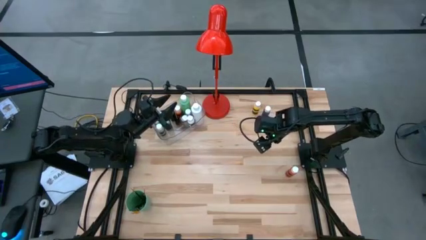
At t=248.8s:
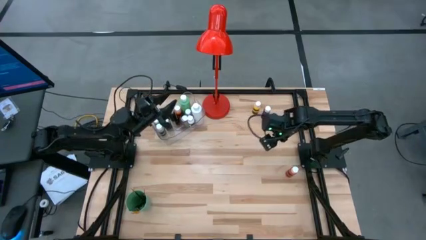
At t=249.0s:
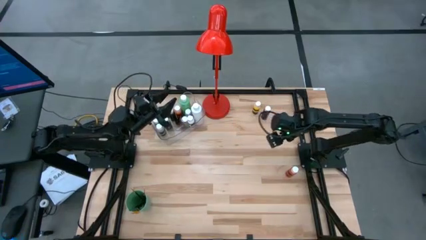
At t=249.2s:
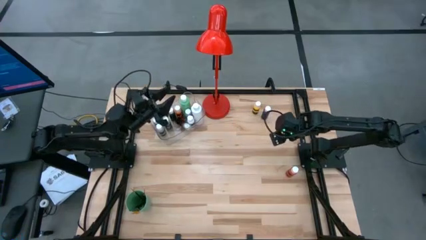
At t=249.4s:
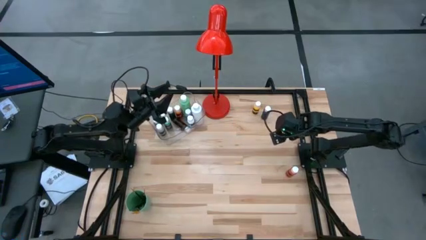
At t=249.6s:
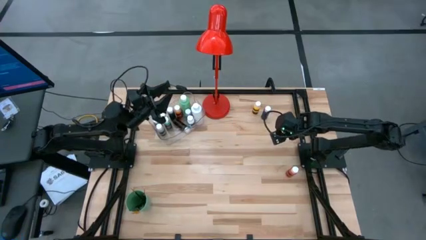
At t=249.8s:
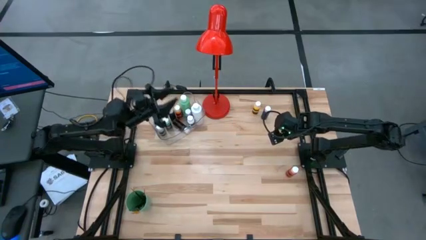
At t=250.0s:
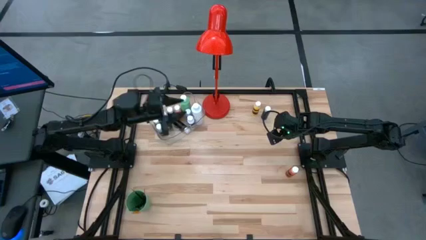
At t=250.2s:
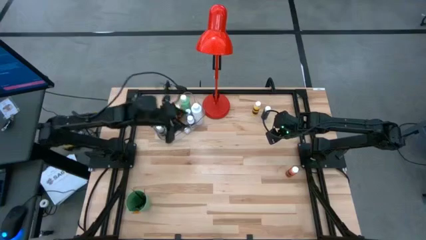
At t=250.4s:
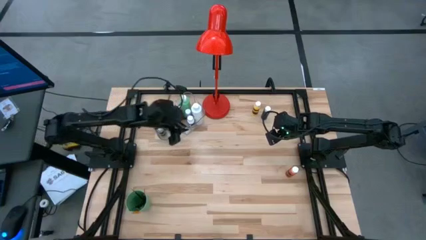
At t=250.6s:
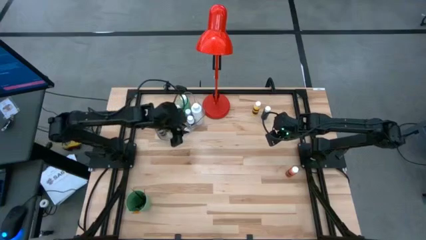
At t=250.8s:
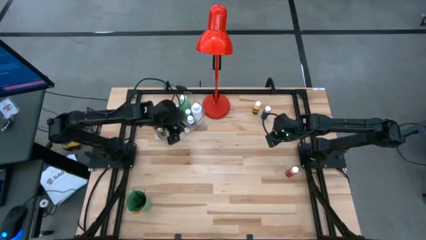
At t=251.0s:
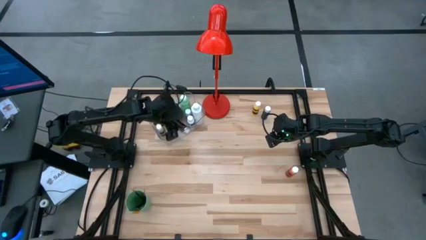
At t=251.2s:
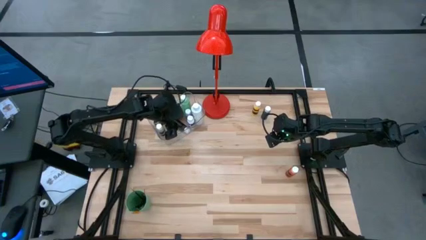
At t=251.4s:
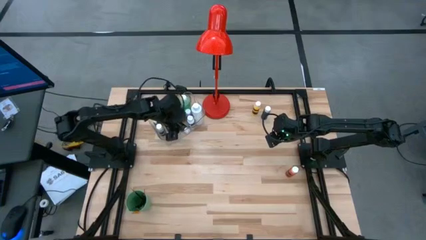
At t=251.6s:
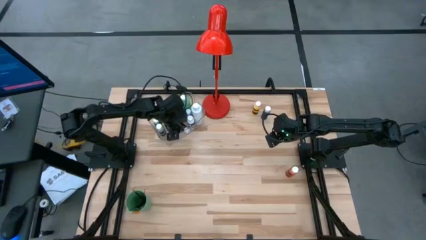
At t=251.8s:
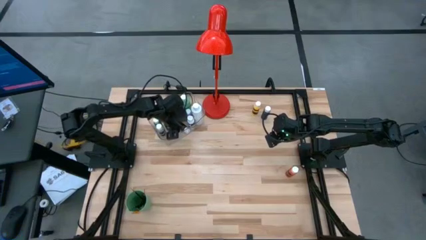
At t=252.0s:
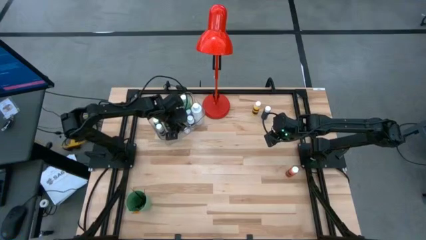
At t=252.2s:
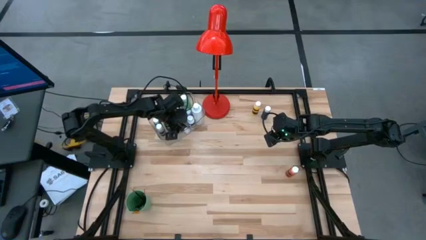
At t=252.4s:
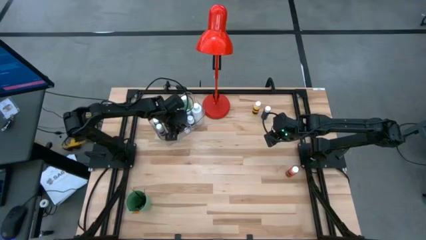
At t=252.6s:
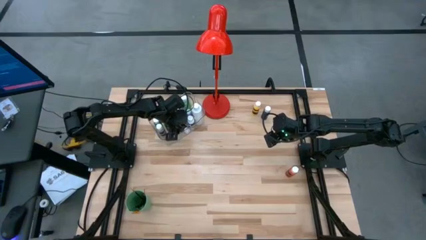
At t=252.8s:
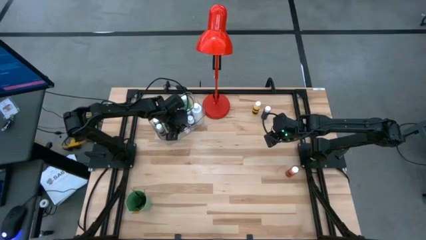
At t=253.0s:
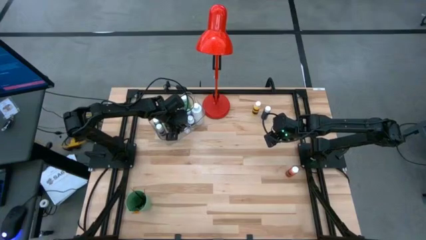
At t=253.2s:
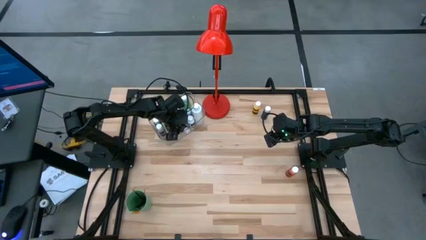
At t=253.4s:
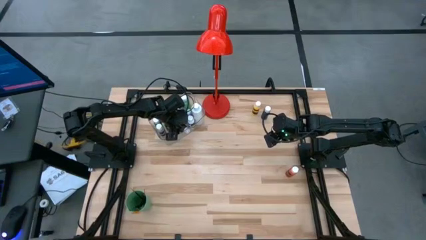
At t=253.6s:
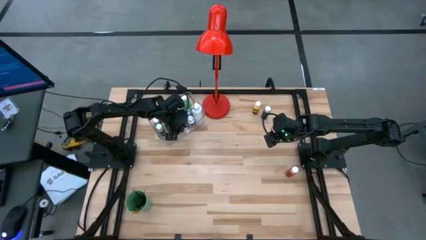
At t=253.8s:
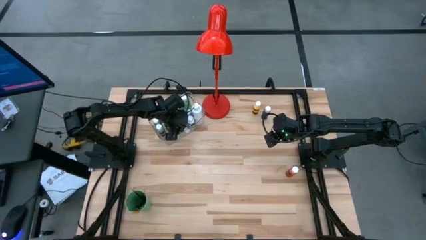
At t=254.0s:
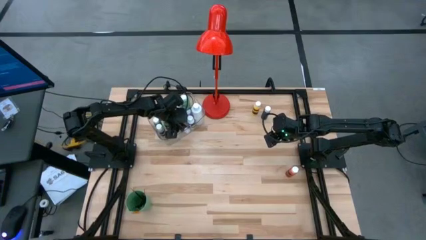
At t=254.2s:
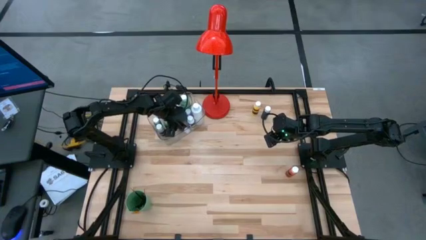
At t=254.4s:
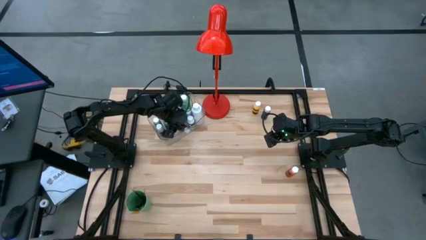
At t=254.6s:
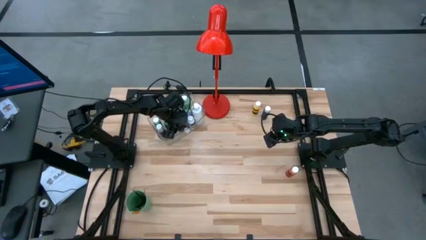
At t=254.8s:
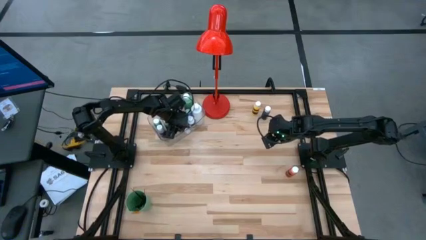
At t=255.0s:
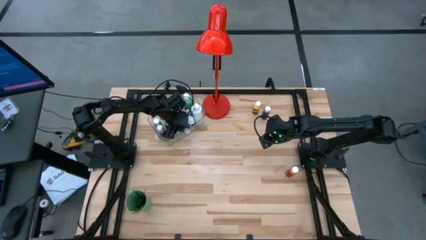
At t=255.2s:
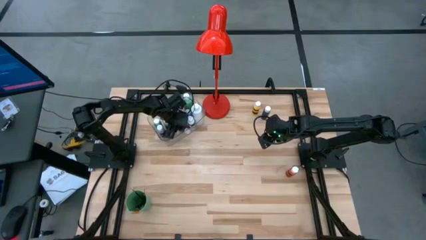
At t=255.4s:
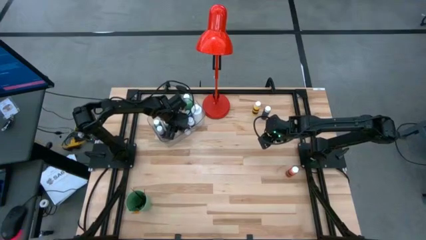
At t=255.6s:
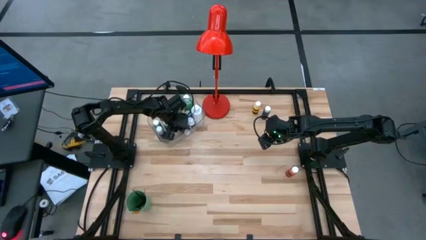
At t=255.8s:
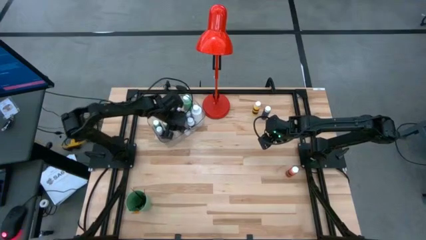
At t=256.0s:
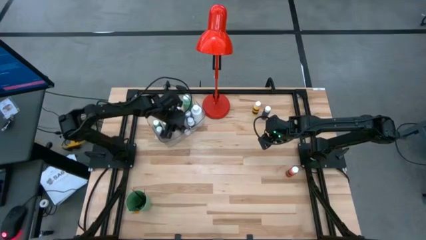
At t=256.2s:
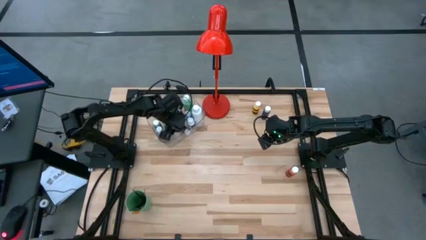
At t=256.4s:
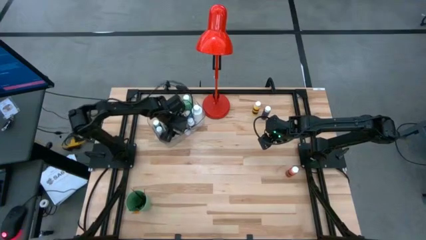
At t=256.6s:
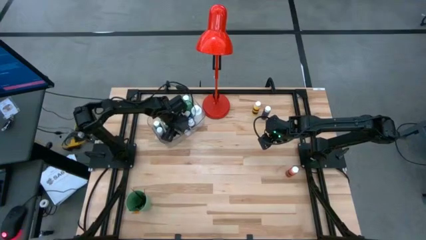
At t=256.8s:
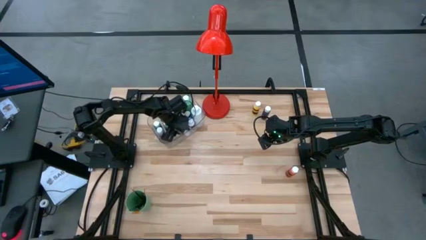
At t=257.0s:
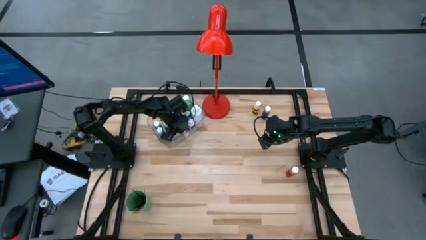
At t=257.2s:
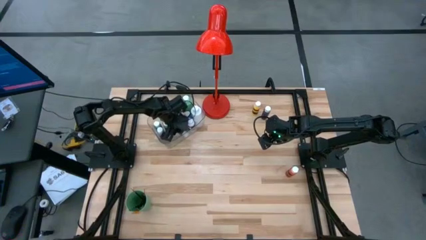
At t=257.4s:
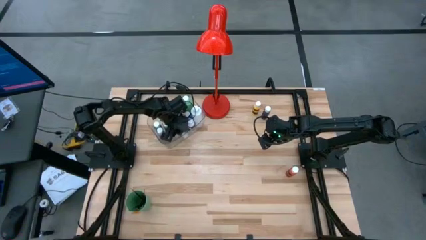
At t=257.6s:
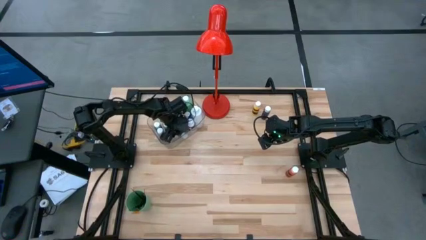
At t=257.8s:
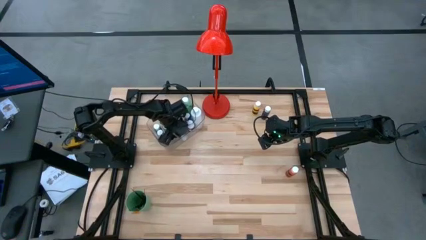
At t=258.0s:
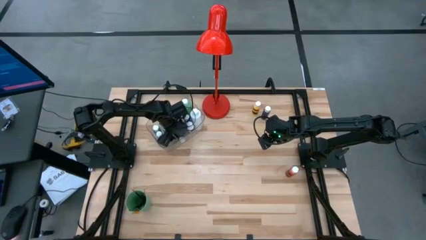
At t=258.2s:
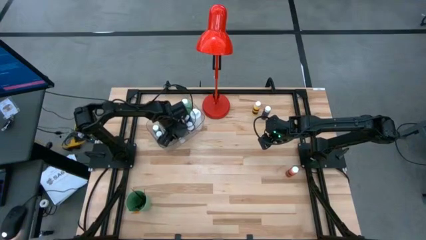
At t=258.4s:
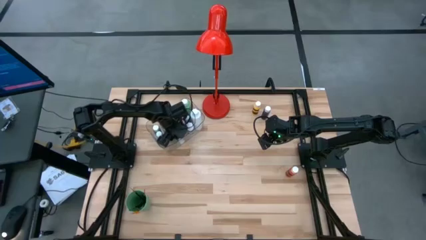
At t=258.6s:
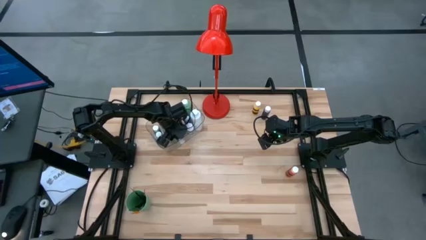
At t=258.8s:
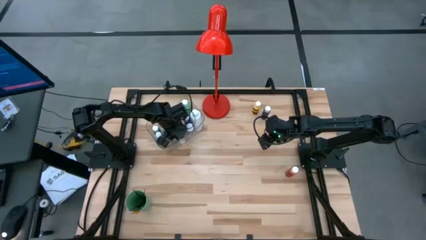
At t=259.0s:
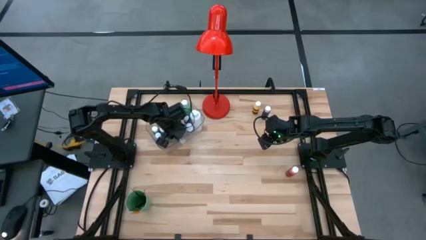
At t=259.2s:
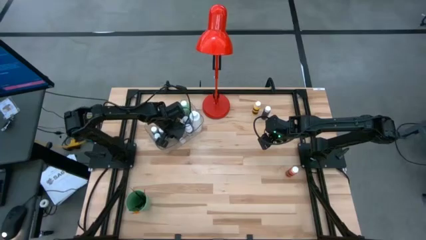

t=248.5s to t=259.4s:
Task: Pick & Place Paint Supplies
Put the brown paint bottle into the transparent bin
